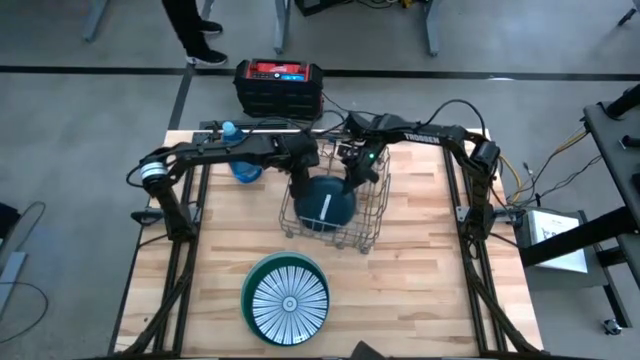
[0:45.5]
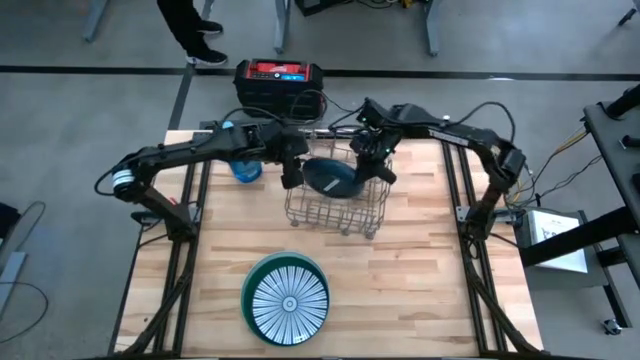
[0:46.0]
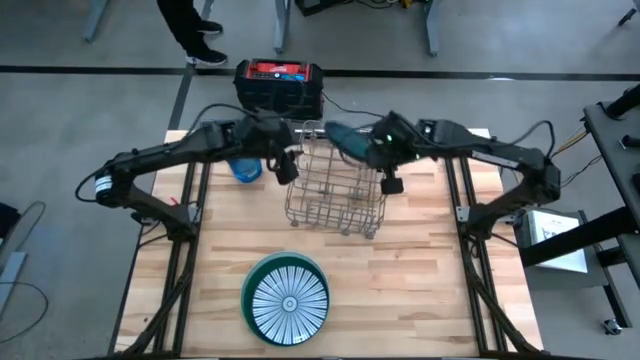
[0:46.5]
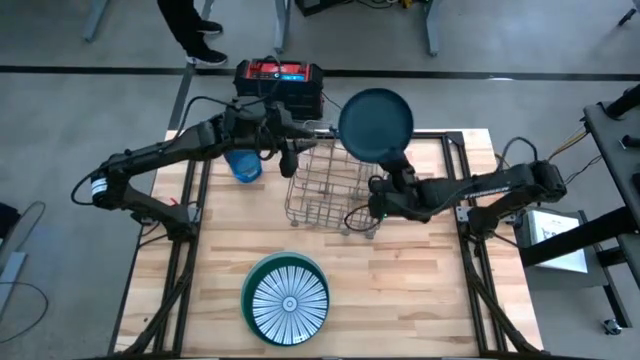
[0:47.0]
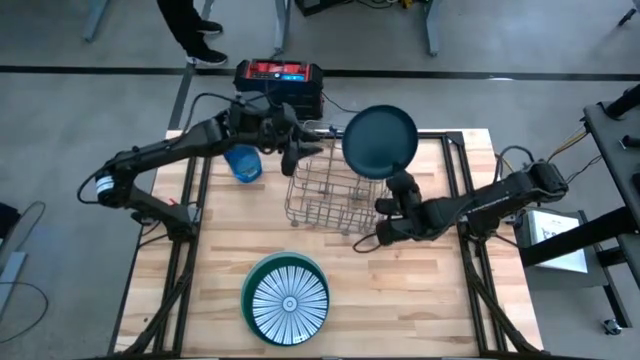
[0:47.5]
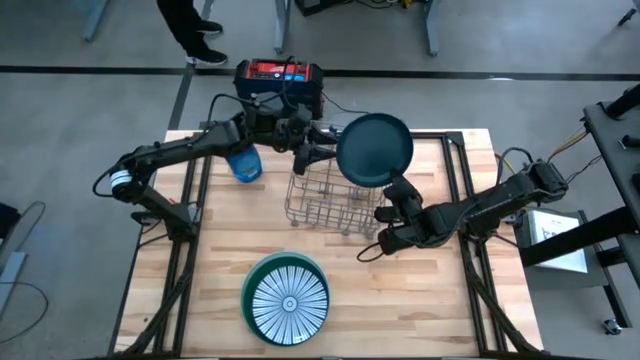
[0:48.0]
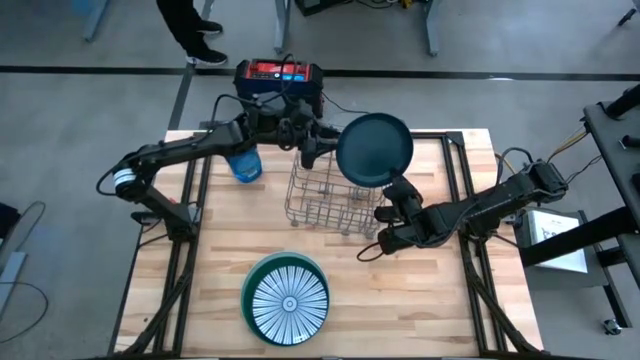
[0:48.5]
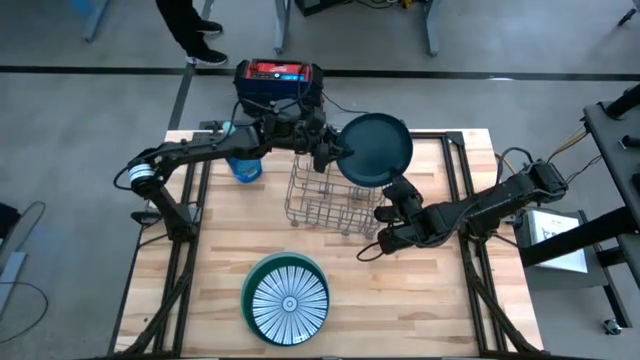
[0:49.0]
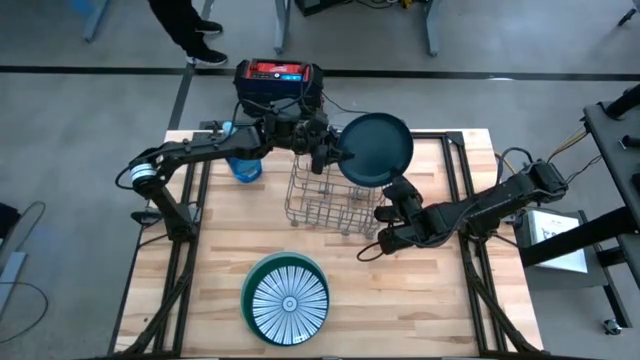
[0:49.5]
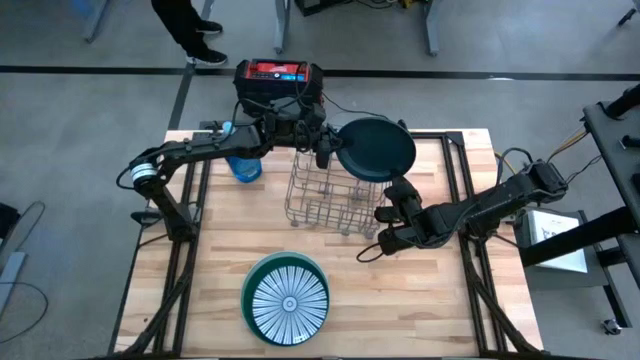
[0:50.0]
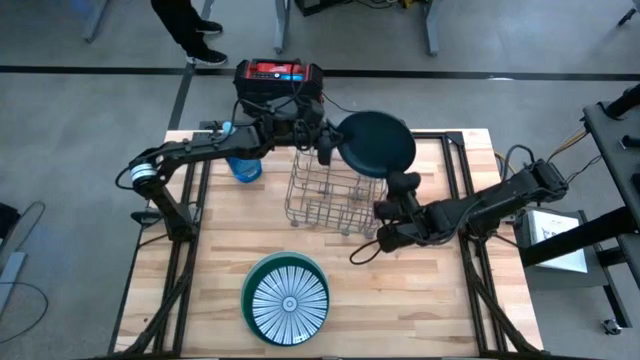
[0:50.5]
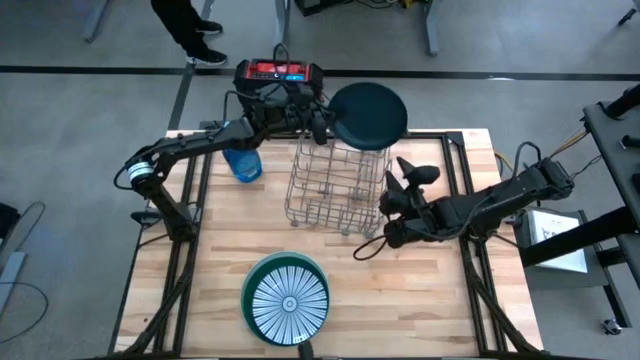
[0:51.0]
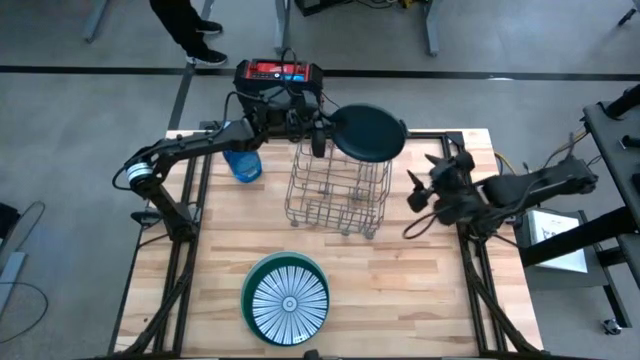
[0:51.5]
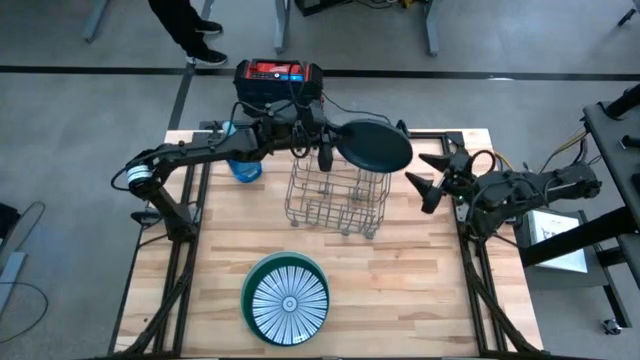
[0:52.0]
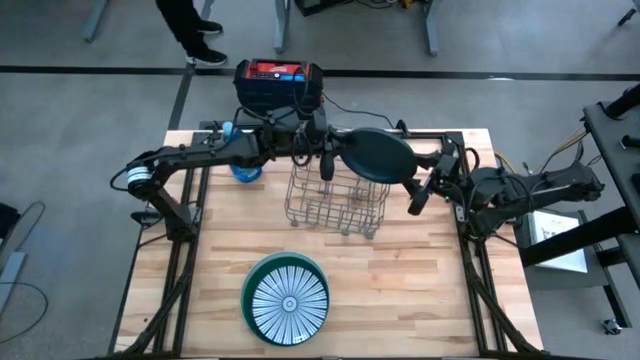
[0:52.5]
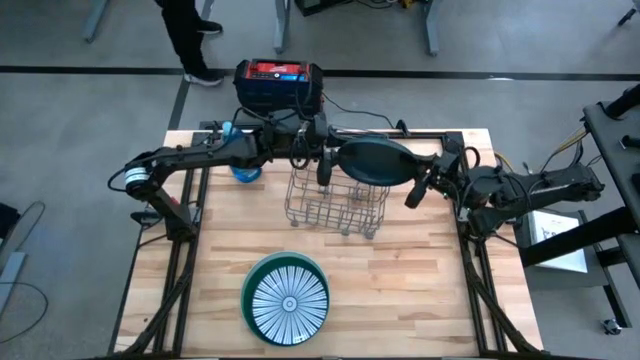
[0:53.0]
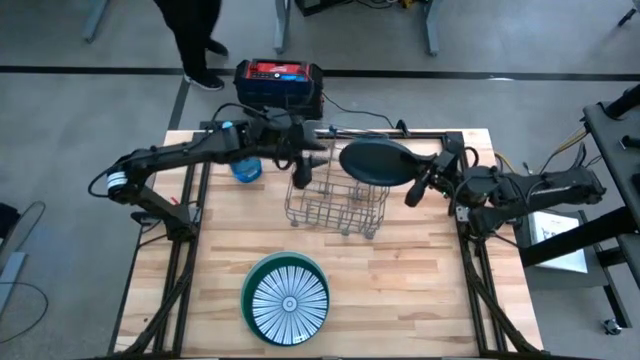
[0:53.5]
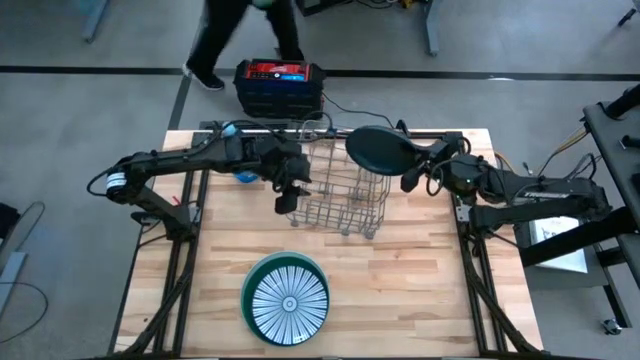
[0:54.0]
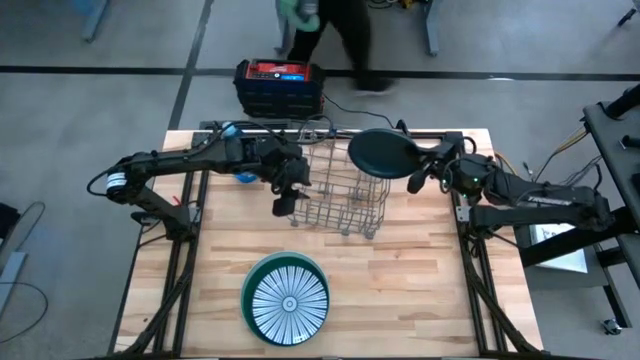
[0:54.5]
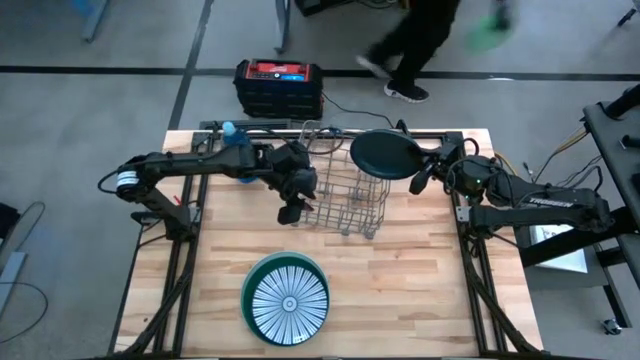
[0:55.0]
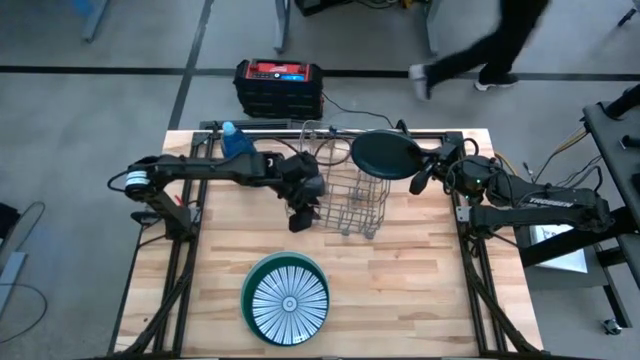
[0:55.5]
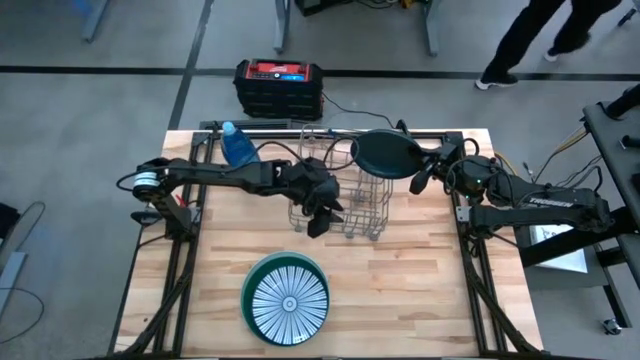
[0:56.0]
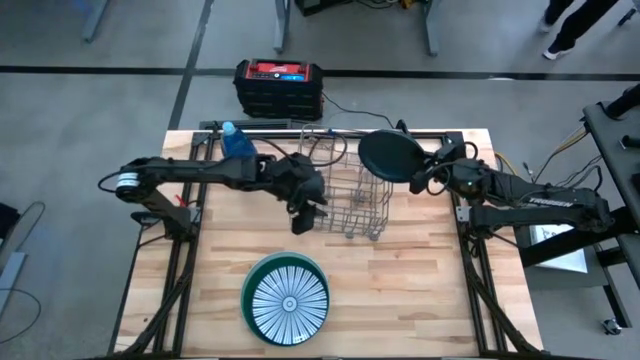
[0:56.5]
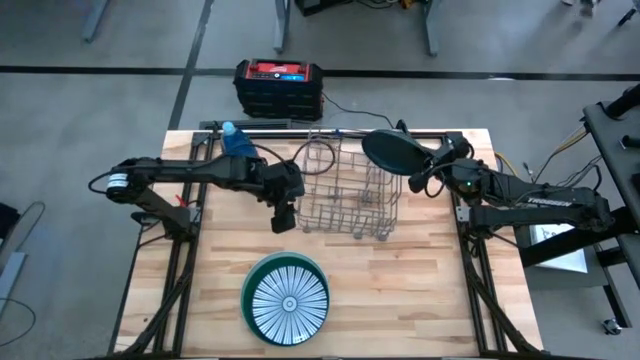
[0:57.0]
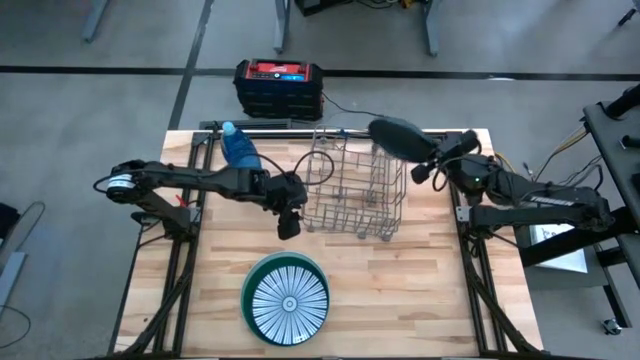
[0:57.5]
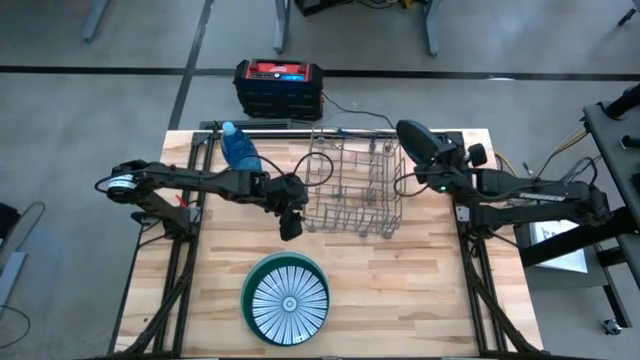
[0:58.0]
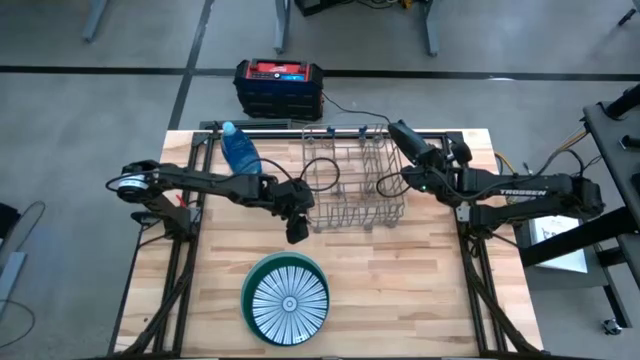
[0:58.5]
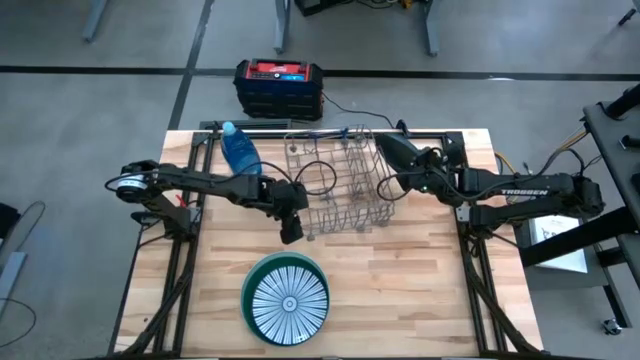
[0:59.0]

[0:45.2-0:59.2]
Task: Sort dishes
Put the blue plate into the gray dishwasher rack

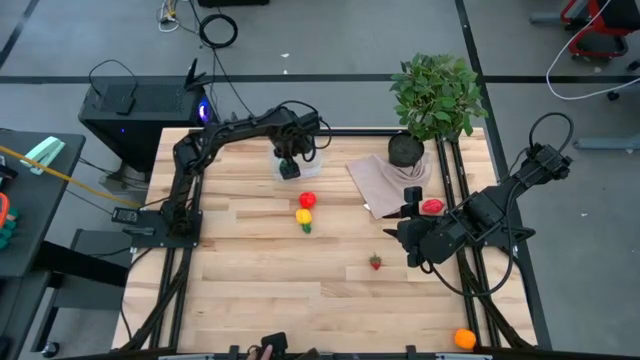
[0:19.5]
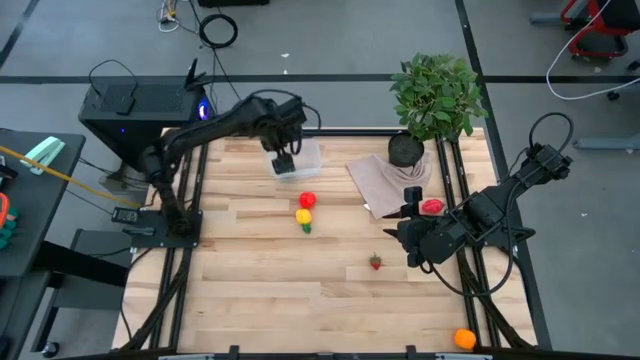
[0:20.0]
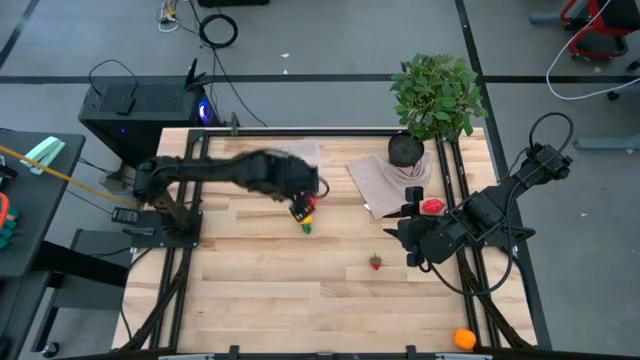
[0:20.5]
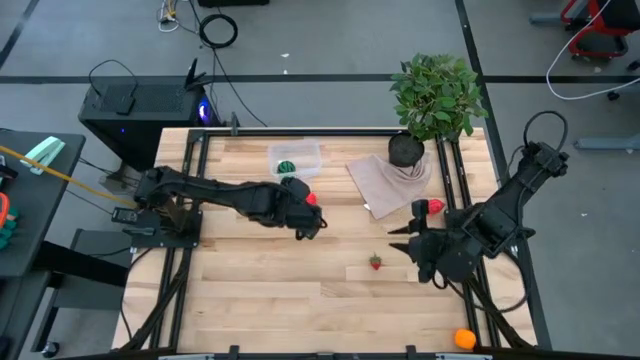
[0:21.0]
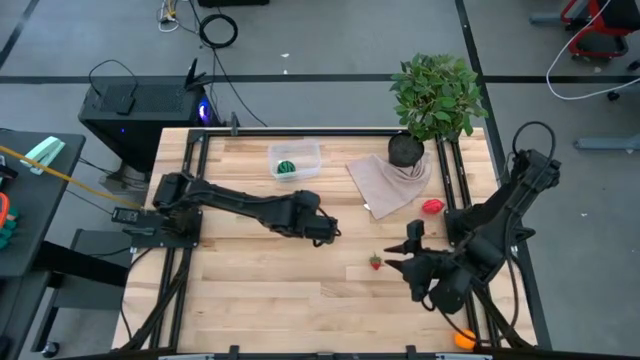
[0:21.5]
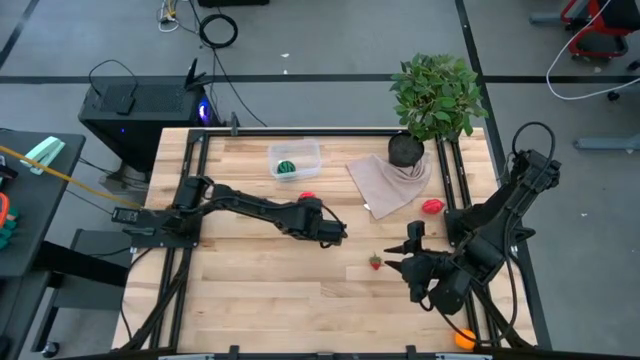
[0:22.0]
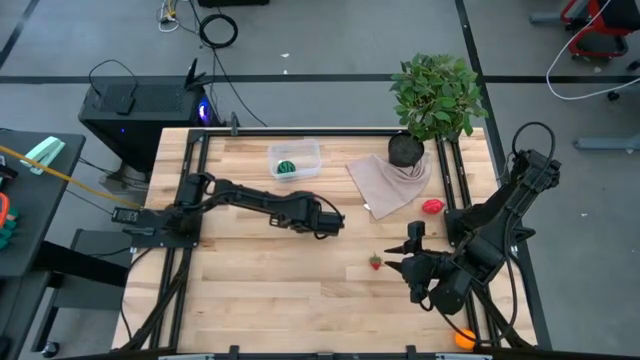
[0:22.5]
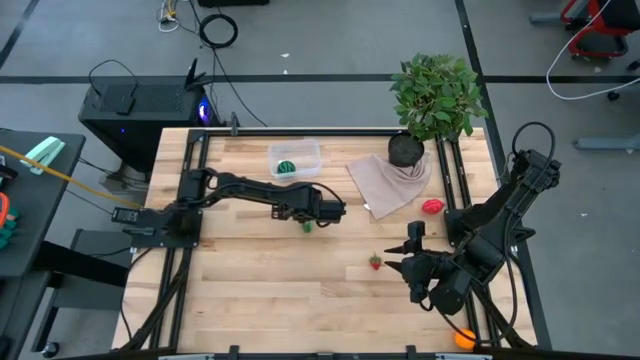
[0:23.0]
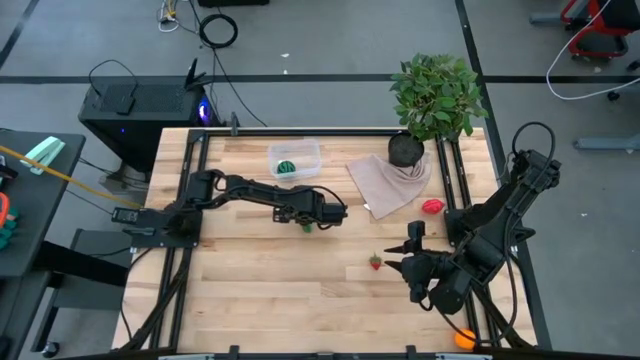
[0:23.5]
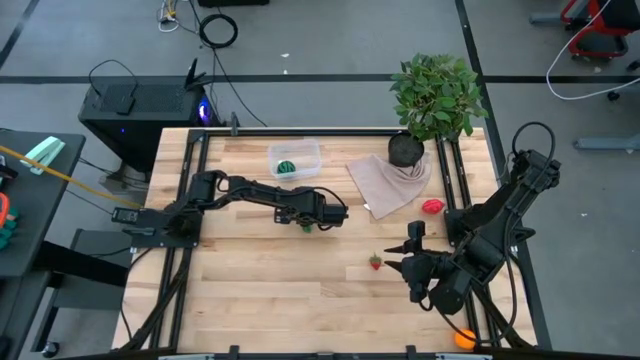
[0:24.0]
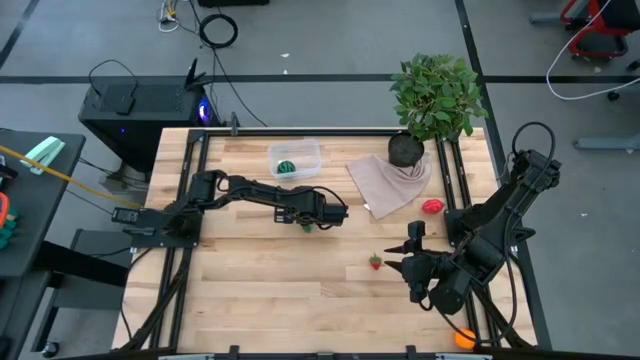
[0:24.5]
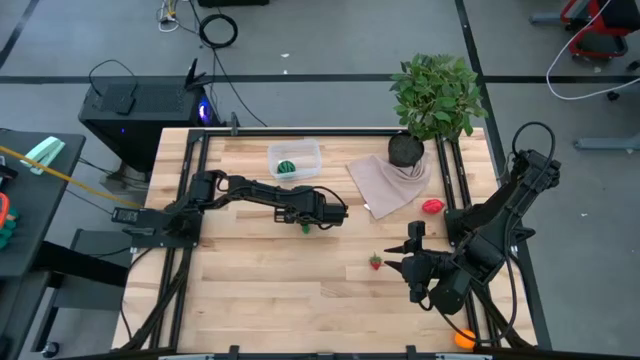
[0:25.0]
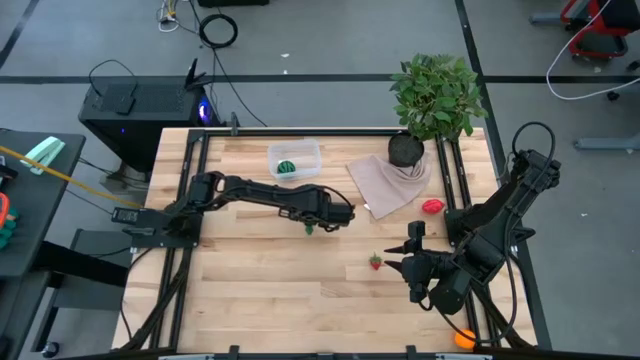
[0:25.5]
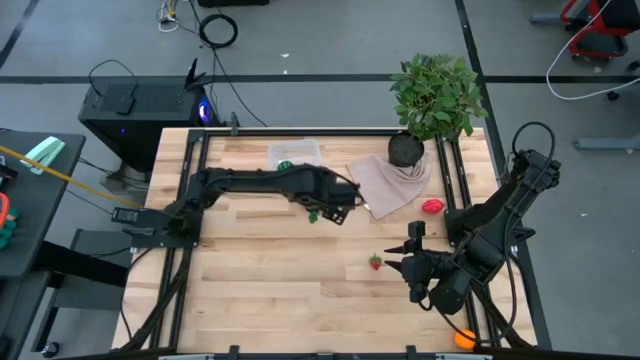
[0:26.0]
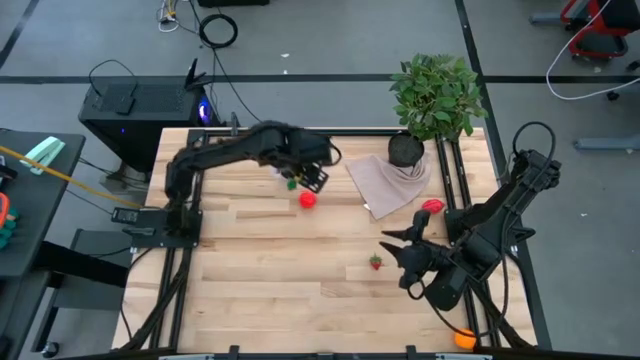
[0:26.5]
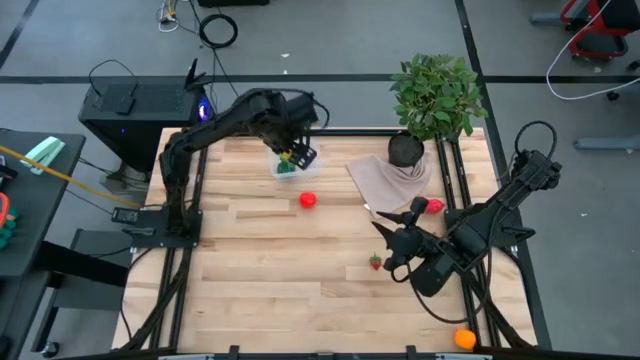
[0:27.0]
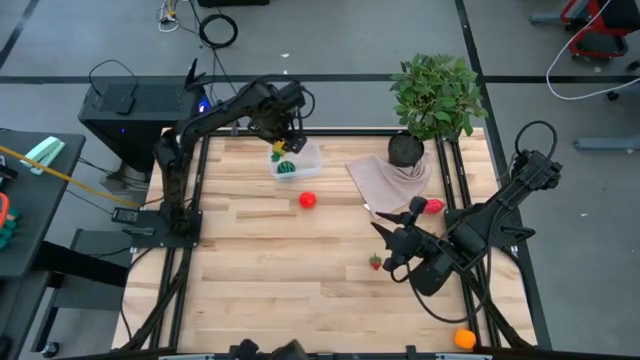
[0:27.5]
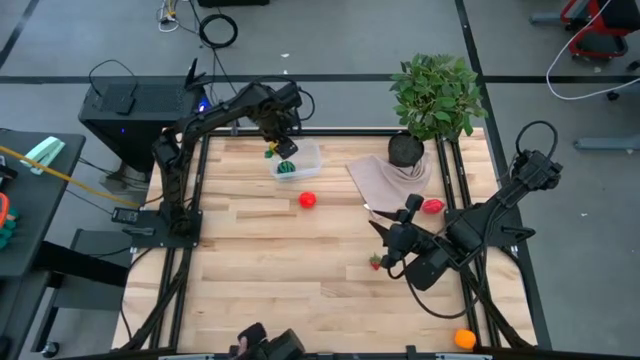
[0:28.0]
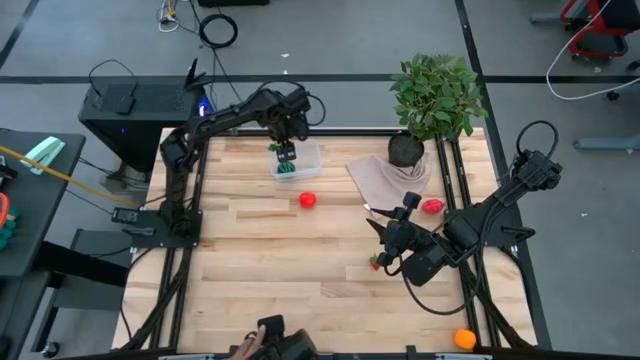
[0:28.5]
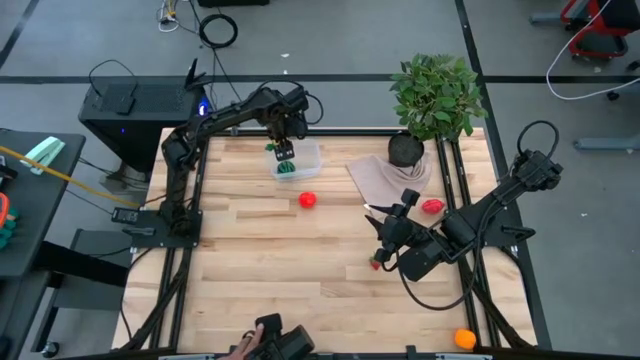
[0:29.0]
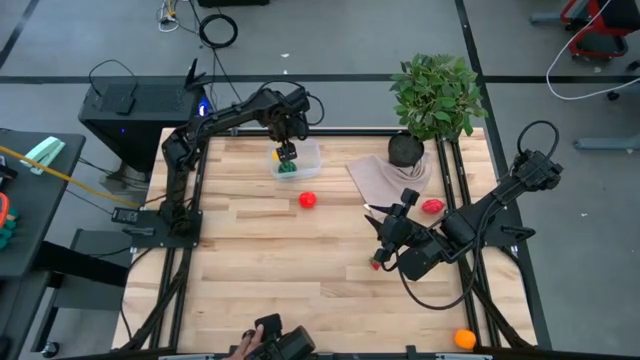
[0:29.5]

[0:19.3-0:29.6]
Task: Pick and placing Produce into tupperware
Put the yellow pineapple into the container
